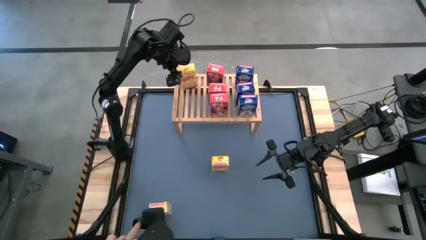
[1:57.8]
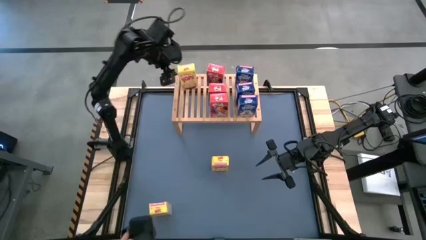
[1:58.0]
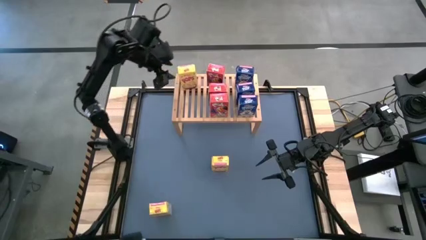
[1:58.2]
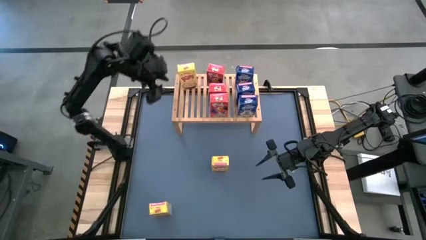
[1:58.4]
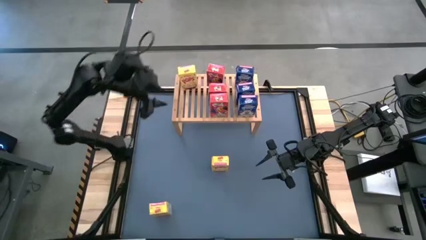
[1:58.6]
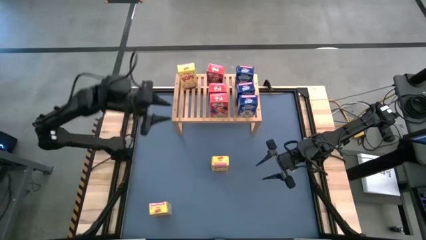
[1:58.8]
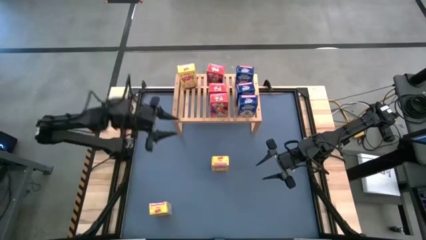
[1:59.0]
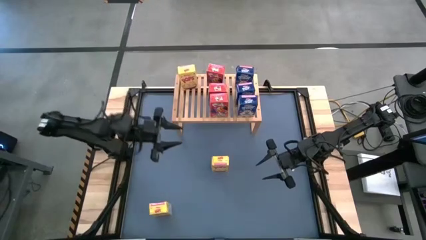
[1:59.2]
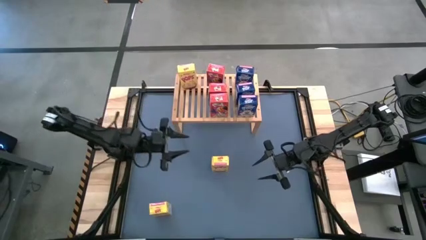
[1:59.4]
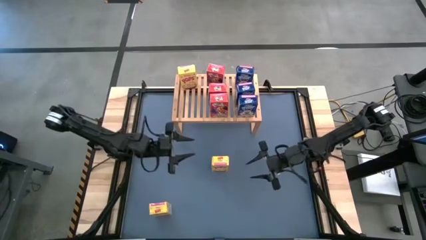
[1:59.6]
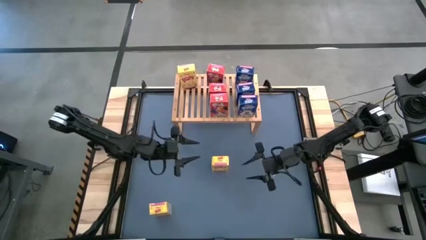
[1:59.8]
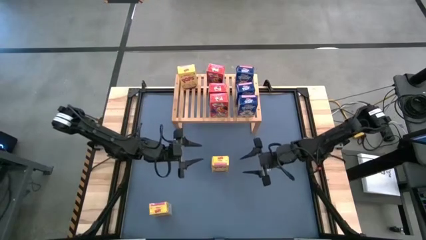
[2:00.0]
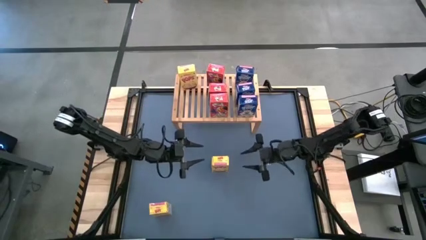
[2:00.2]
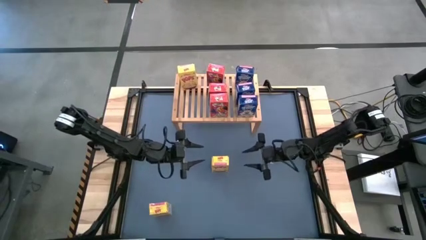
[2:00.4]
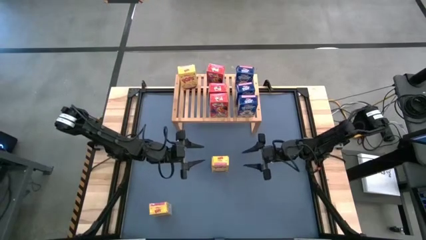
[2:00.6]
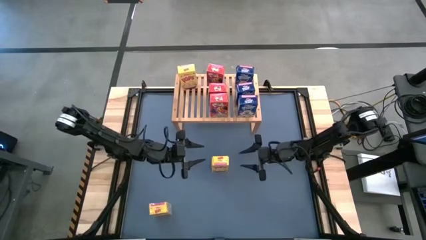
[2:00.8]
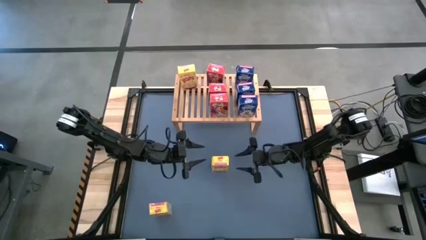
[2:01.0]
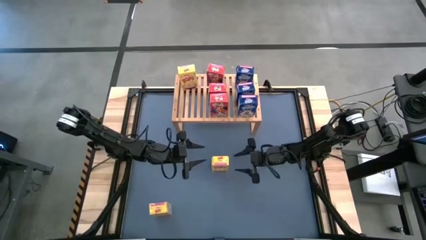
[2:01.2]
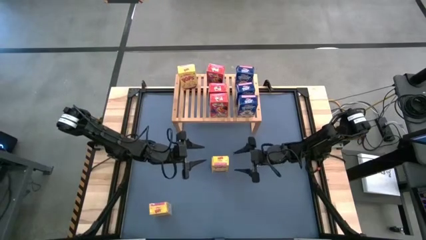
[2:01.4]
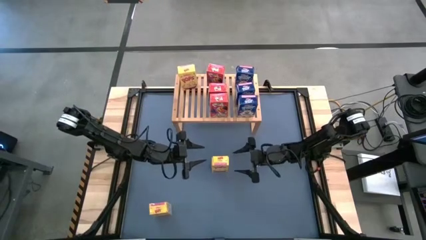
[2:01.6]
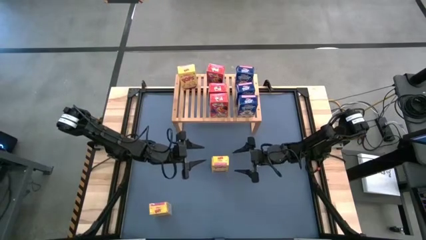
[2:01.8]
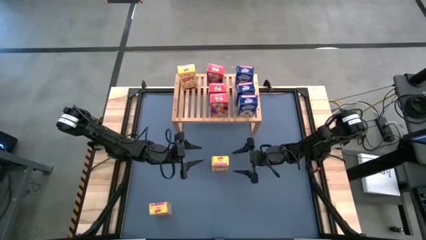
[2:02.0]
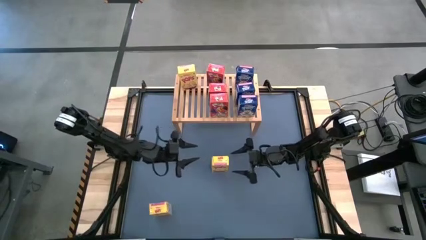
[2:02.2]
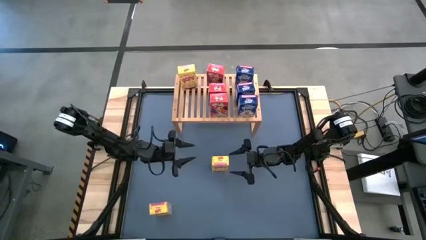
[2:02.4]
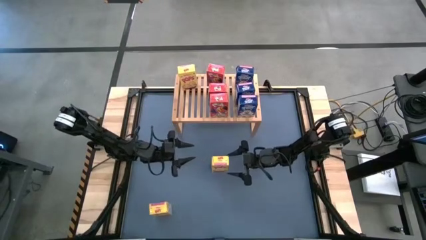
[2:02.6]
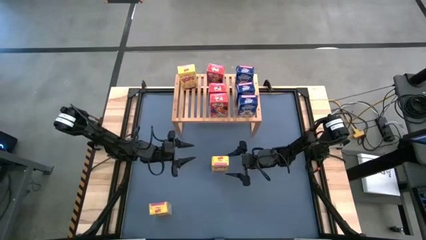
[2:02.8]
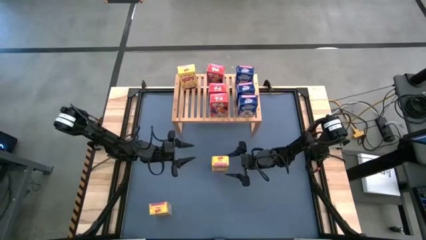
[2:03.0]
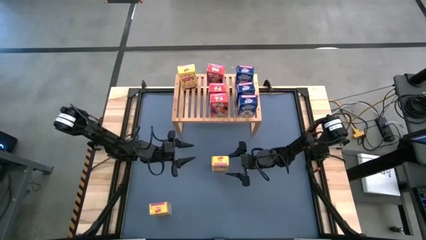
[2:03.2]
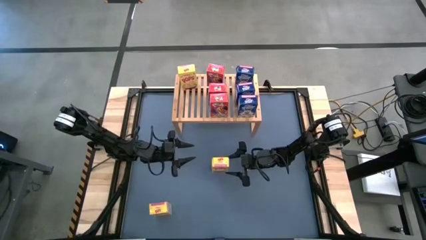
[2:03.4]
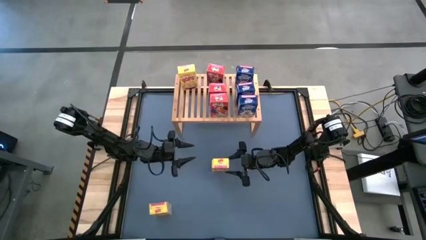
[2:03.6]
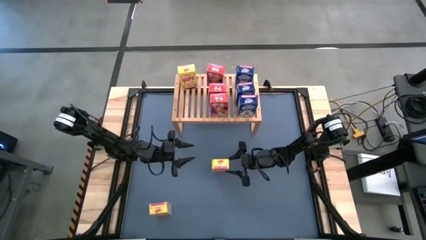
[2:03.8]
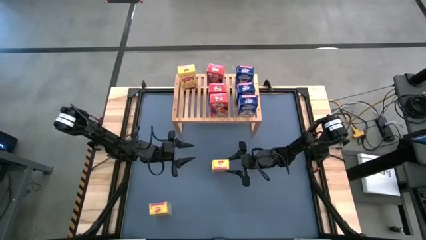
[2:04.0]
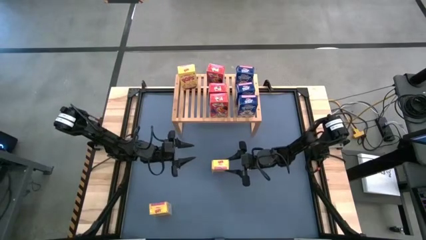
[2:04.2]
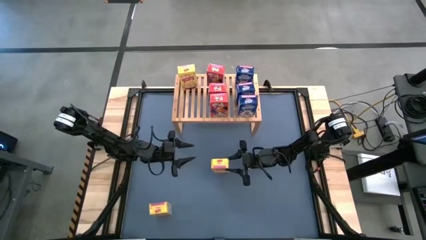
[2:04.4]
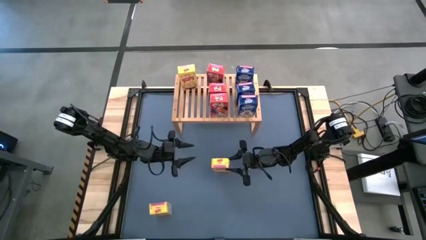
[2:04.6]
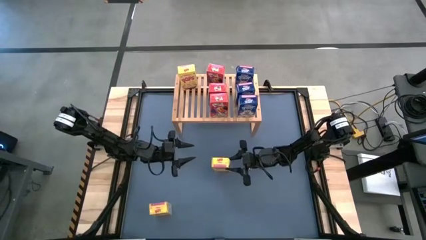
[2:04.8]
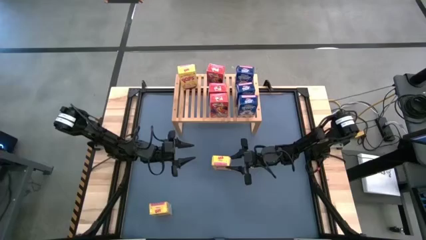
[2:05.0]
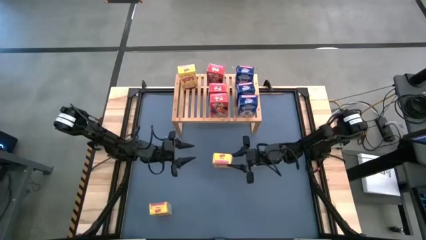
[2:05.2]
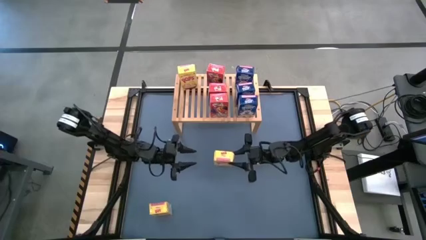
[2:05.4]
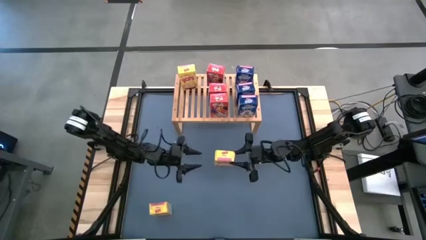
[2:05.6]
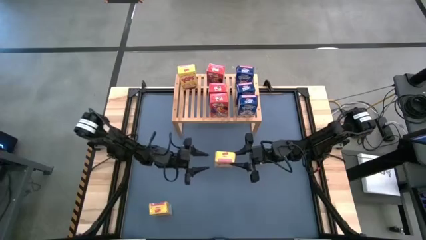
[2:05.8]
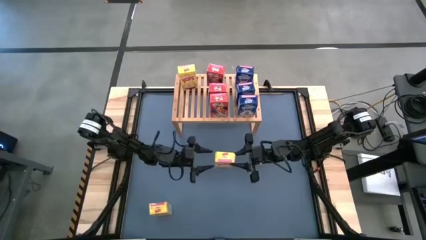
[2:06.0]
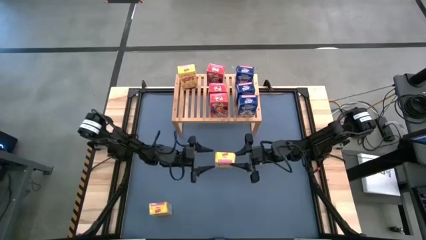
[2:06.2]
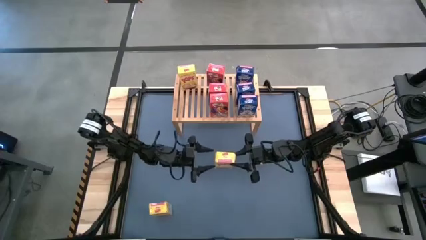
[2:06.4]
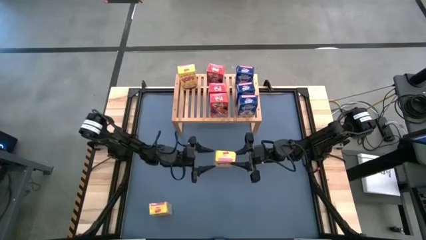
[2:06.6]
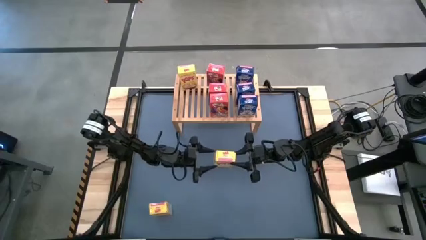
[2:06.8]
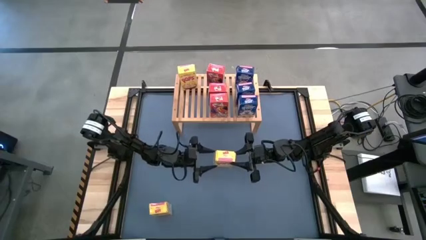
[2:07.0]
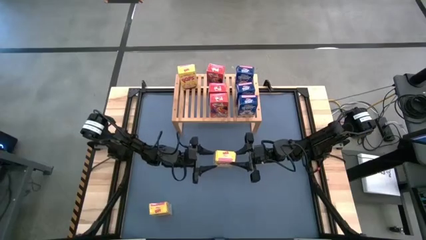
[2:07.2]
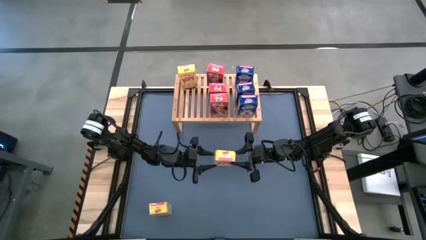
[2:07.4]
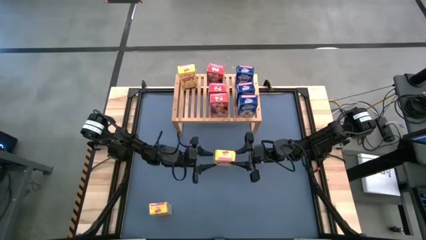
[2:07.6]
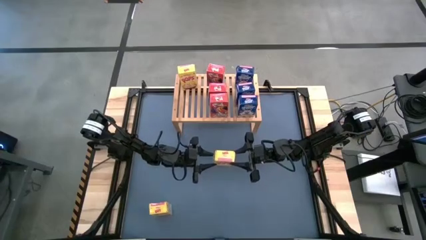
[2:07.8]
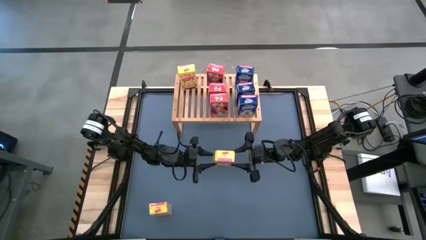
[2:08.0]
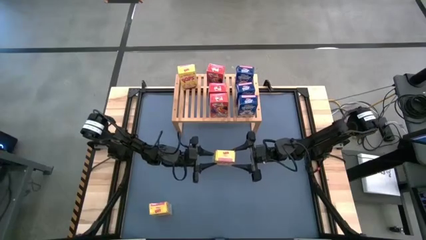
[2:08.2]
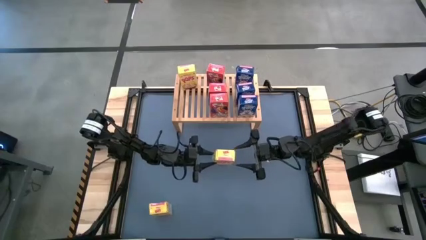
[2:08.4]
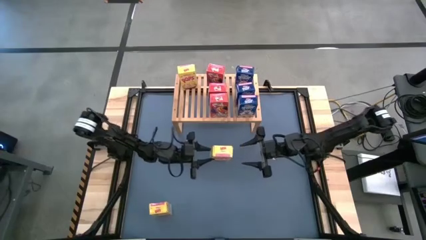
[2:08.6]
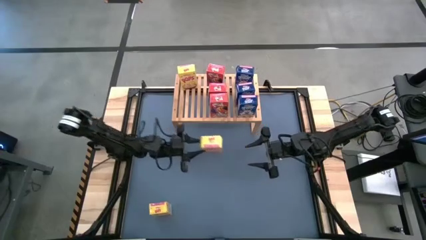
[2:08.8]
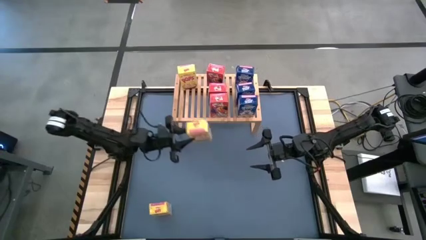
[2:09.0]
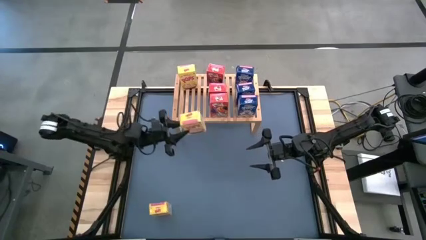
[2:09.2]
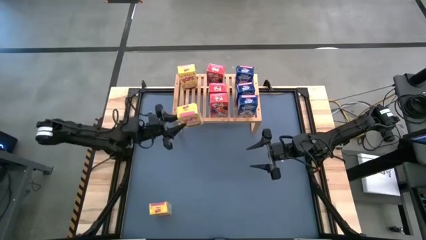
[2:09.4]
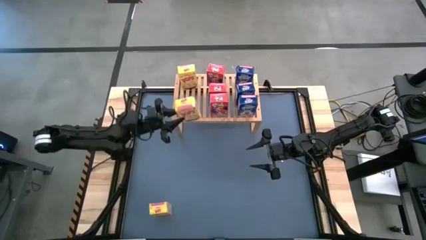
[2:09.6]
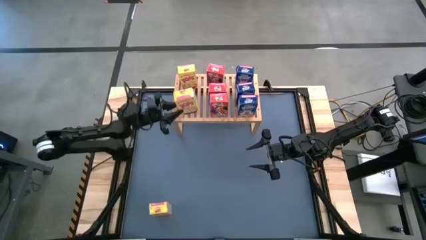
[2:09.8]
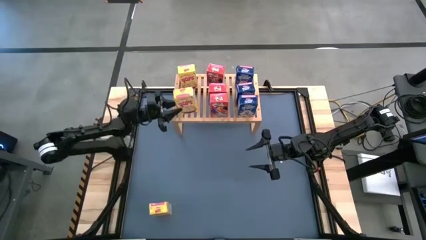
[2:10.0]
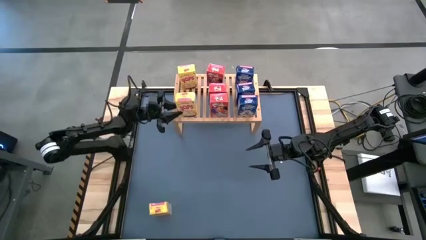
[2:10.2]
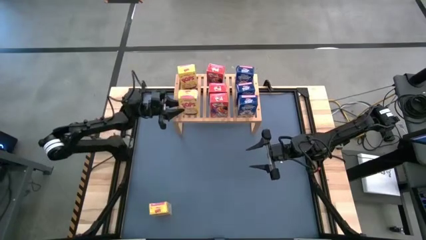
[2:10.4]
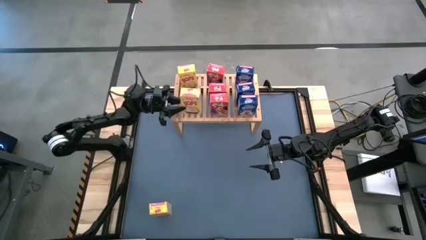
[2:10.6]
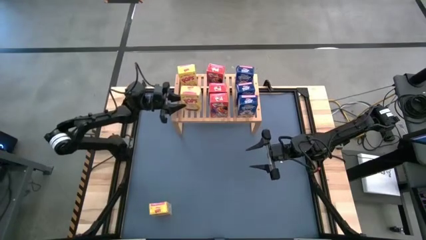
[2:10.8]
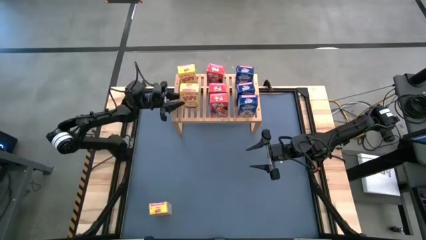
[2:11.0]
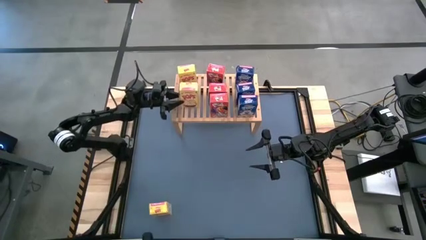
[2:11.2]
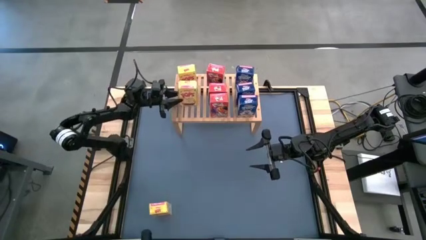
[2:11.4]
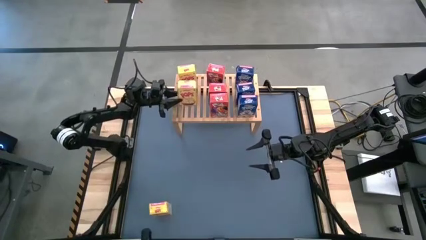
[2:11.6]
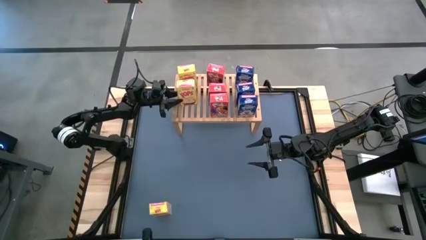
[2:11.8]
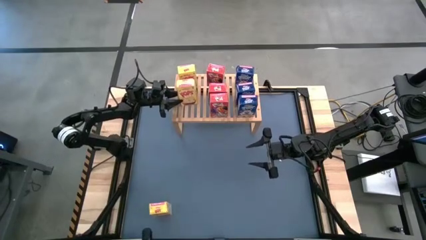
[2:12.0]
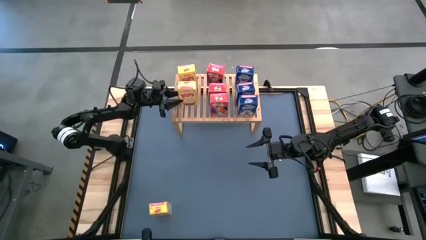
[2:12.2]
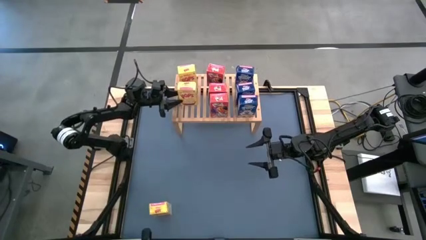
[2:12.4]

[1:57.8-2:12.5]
Task: Stack cereal on shelf
Put the right yellow cereal box on the shelf aligned with the other yellow cereal box
